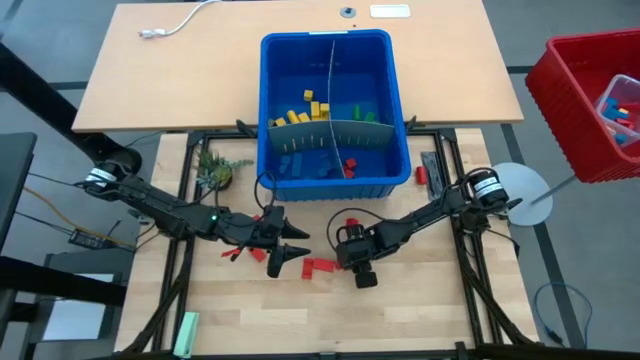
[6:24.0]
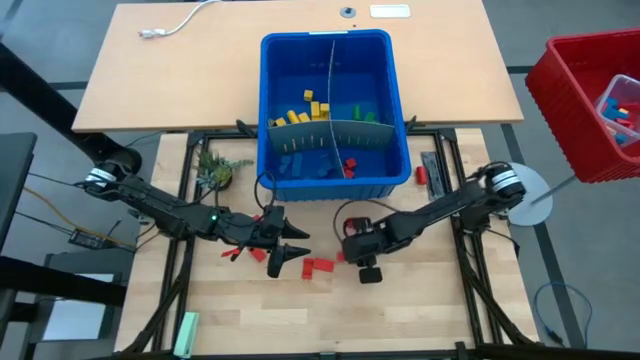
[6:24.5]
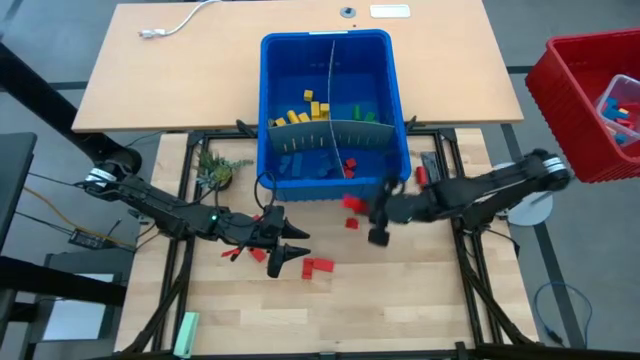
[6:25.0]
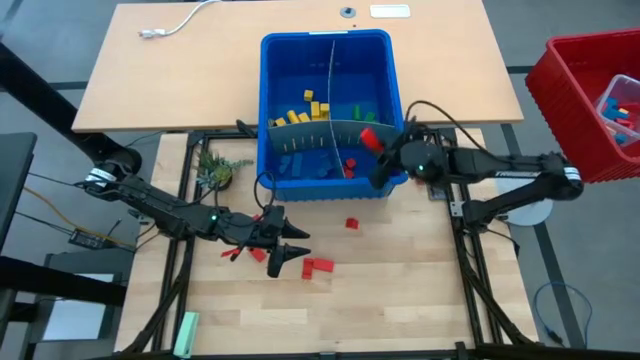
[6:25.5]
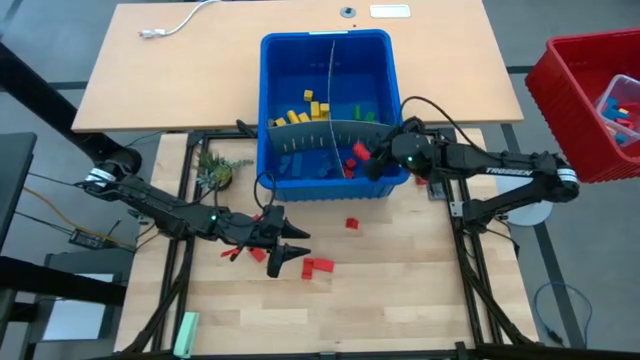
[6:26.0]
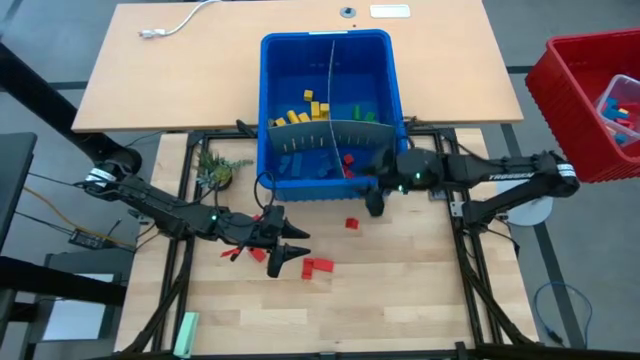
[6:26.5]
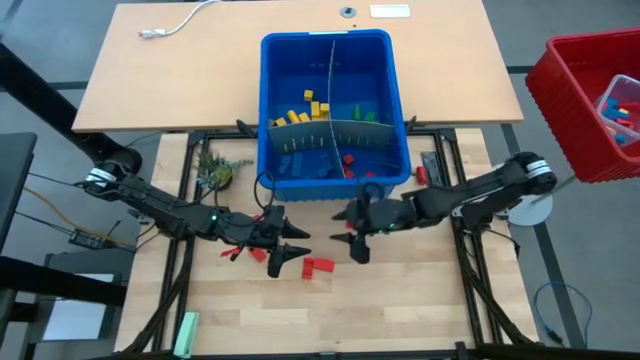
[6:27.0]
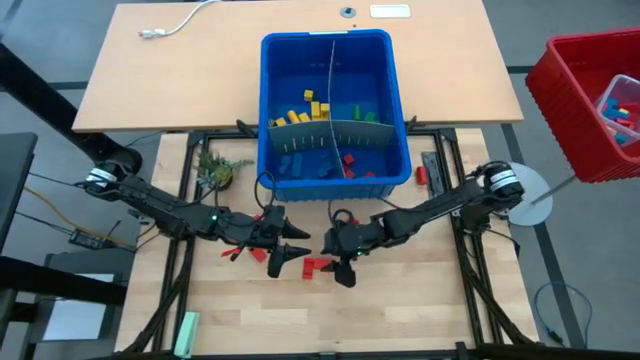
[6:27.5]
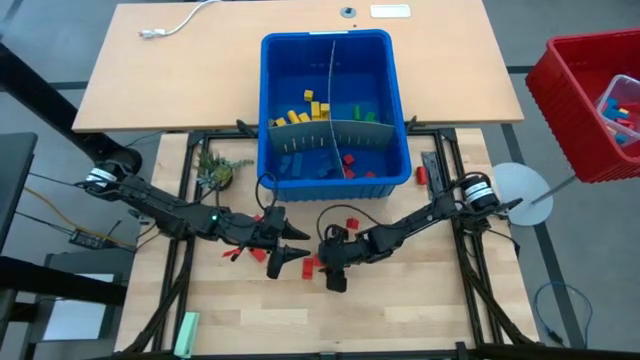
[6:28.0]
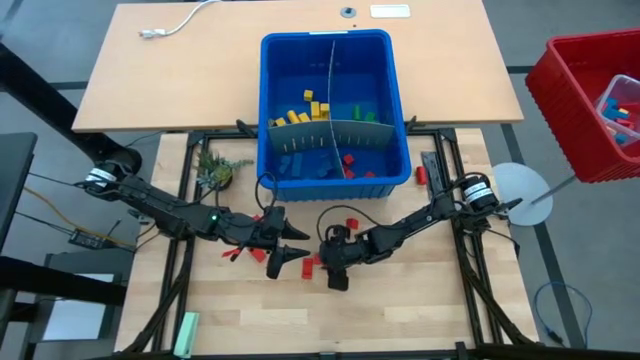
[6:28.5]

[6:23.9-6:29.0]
Task: Sort blocks
Put the orange block with the other orange blocks into the blue bin

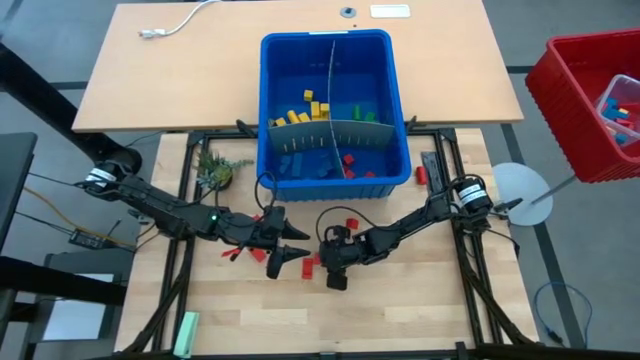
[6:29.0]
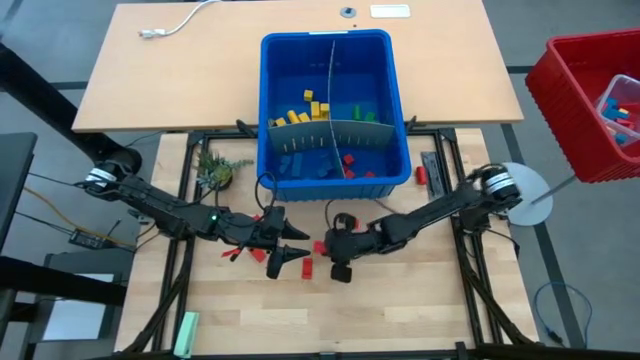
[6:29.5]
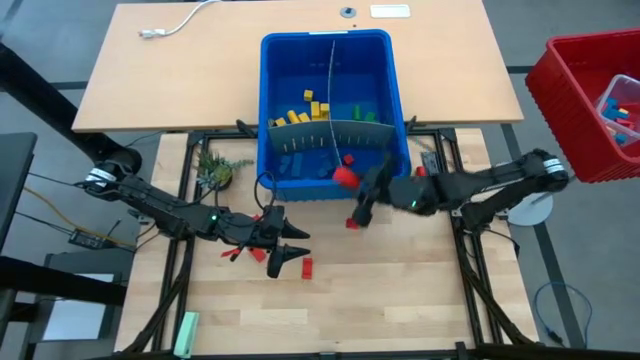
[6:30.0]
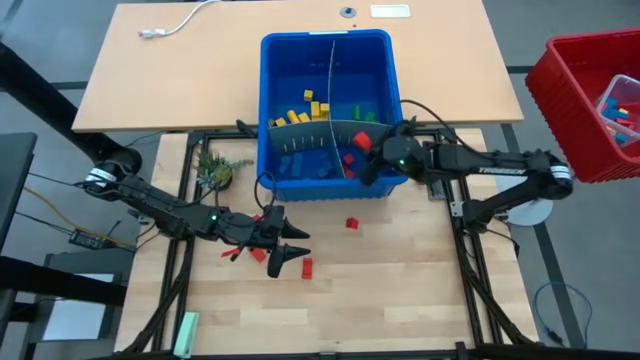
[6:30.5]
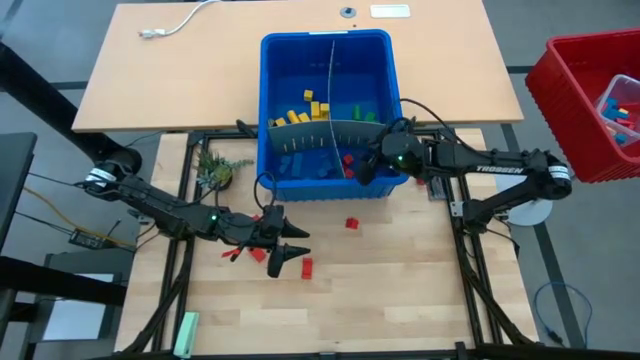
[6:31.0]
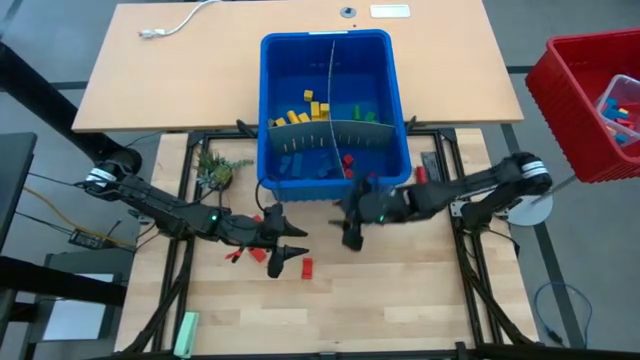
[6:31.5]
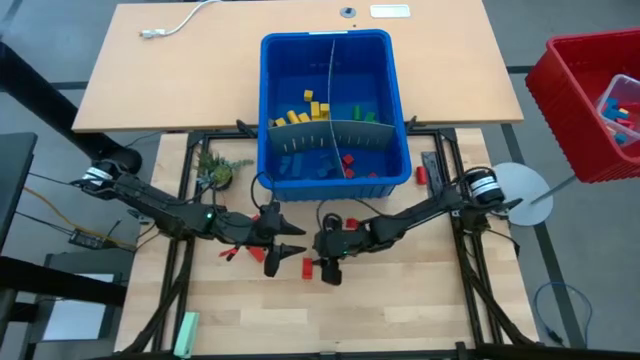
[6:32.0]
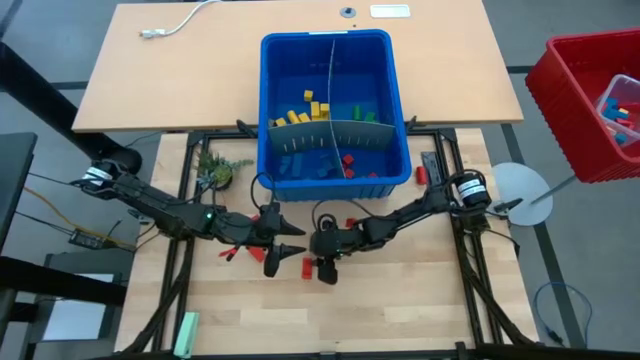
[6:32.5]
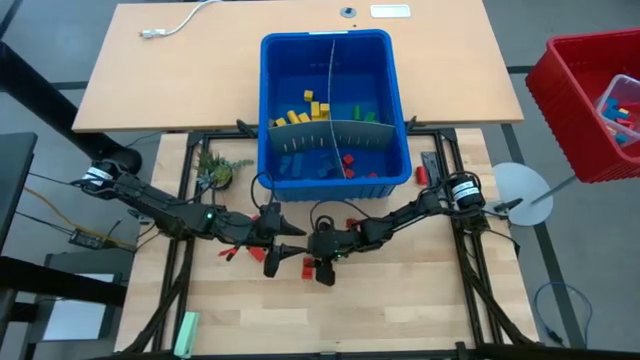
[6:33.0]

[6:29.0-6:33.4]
Put the orange block with the other orange blocks into the blue bin

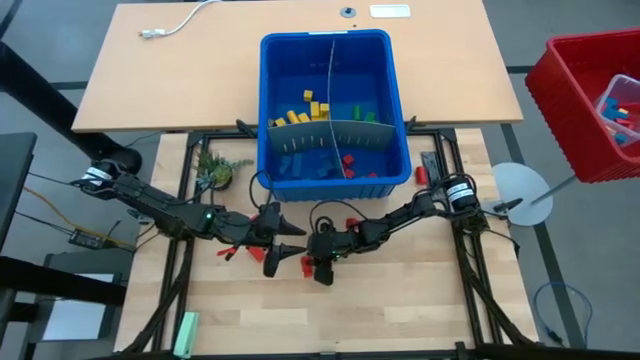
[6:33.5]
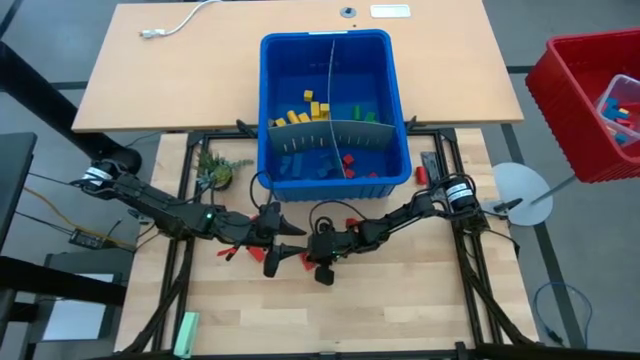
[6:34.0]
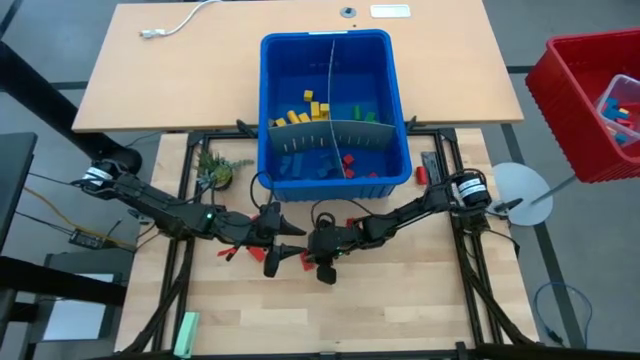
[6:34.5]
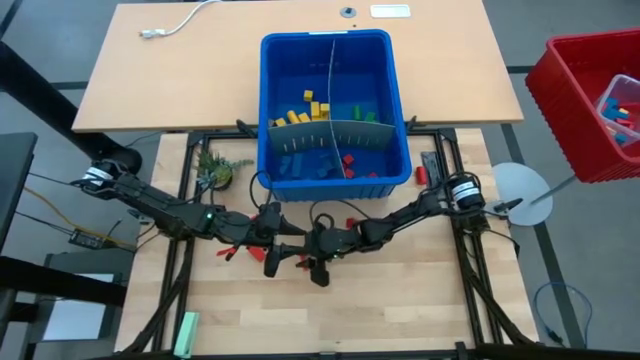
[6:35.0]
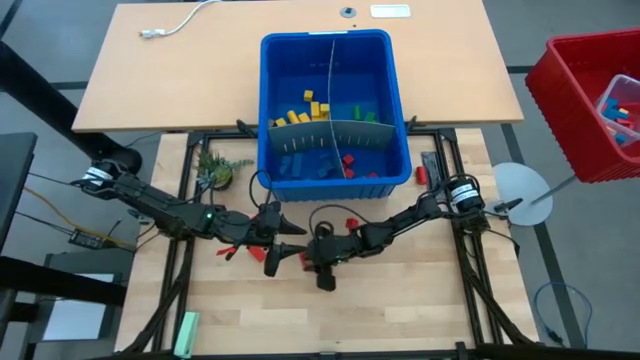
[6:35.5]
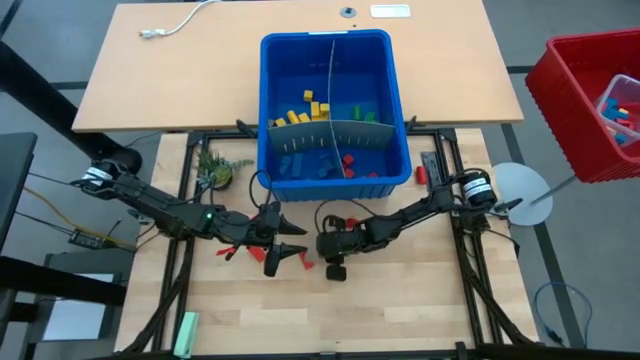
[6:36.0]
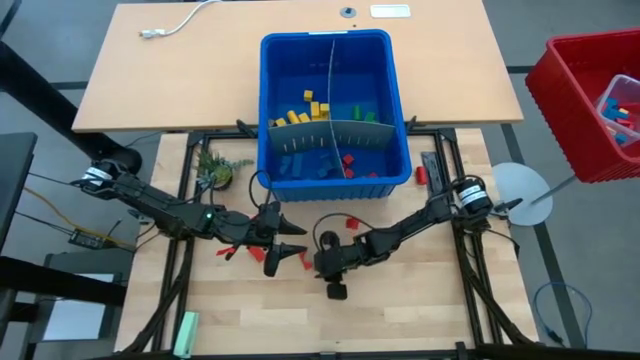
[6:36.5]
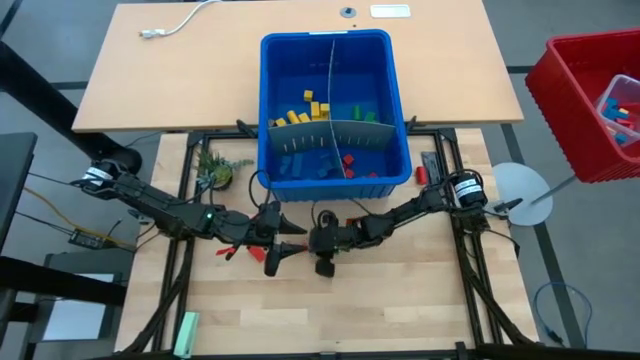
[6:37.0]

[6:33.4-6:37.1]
Put the orange block with the other orange blocks into the blue bin

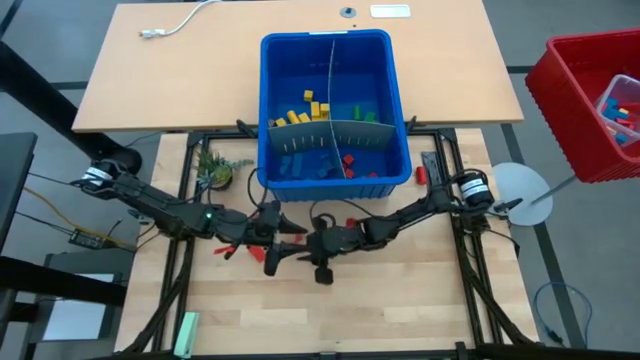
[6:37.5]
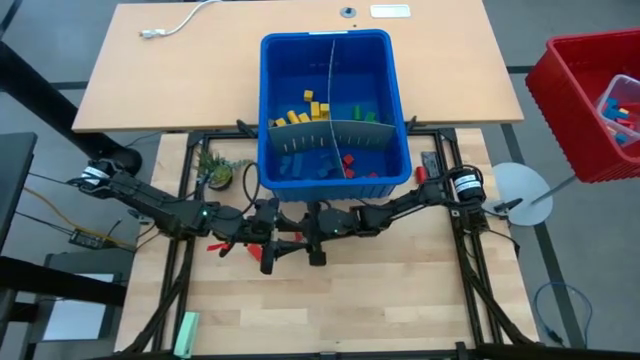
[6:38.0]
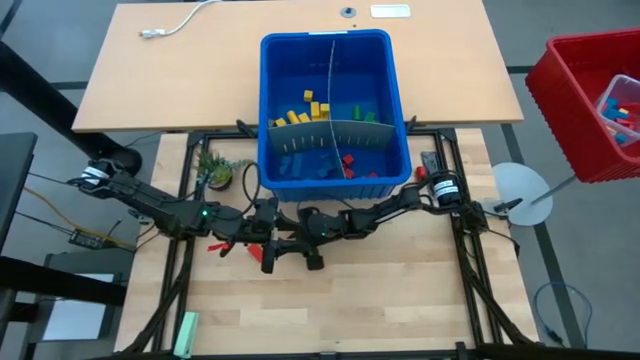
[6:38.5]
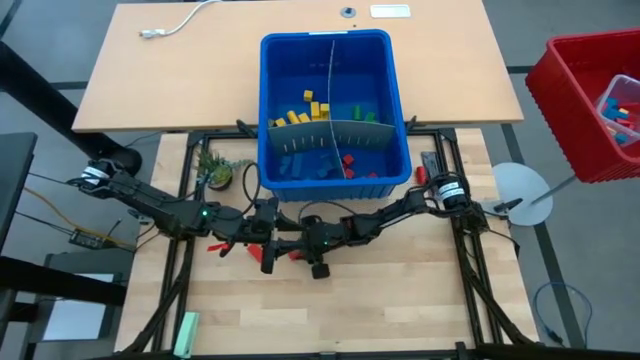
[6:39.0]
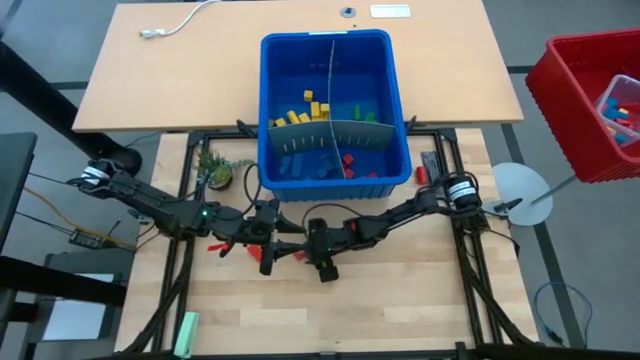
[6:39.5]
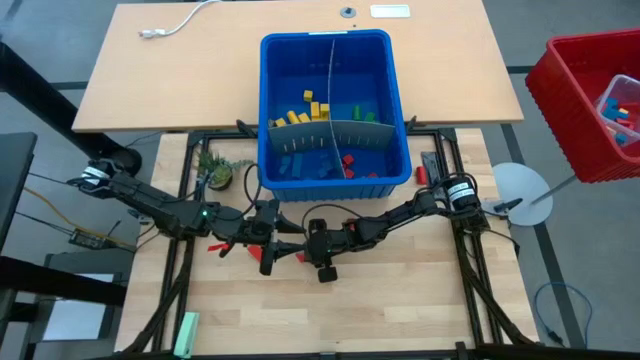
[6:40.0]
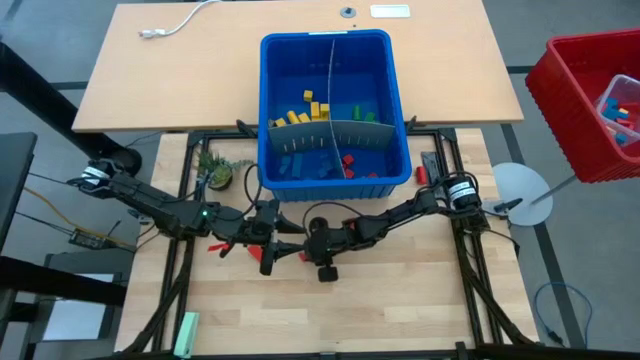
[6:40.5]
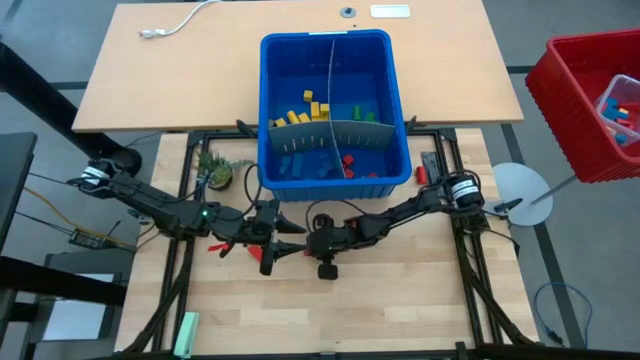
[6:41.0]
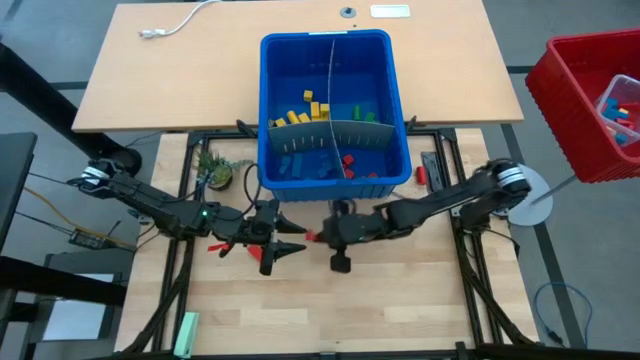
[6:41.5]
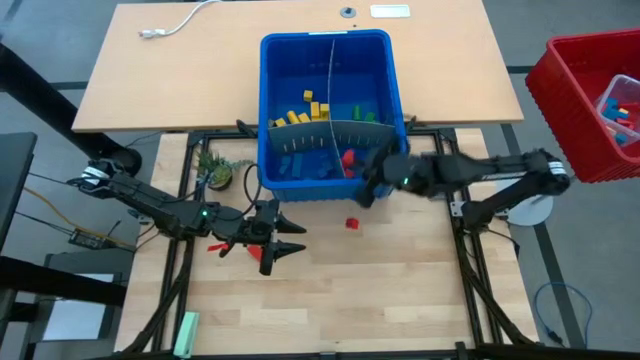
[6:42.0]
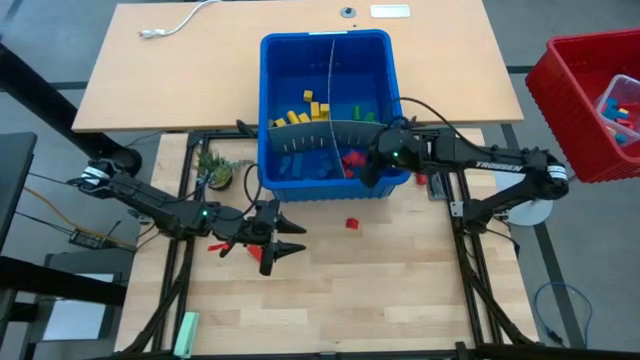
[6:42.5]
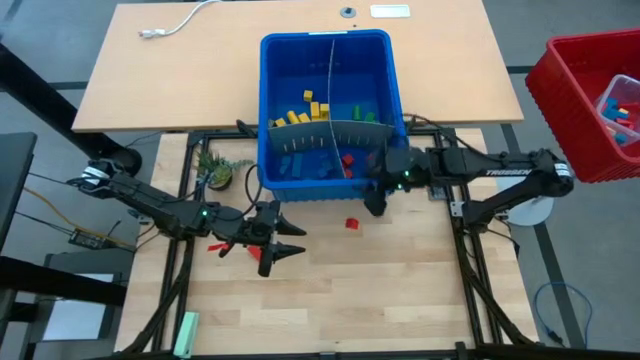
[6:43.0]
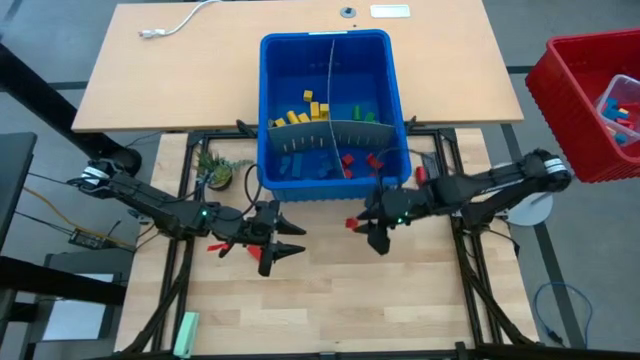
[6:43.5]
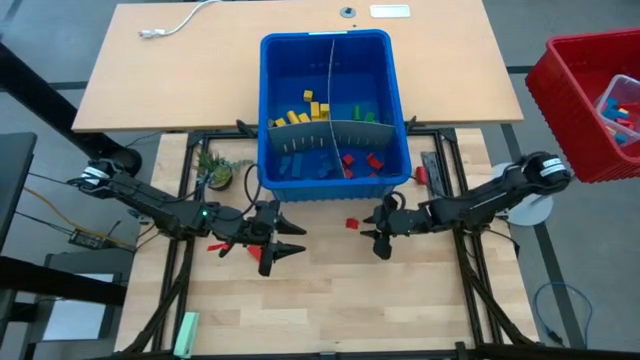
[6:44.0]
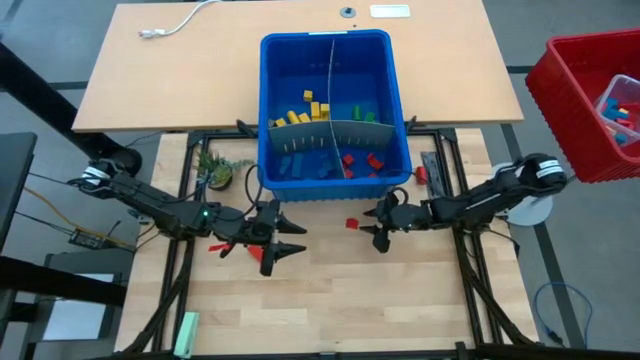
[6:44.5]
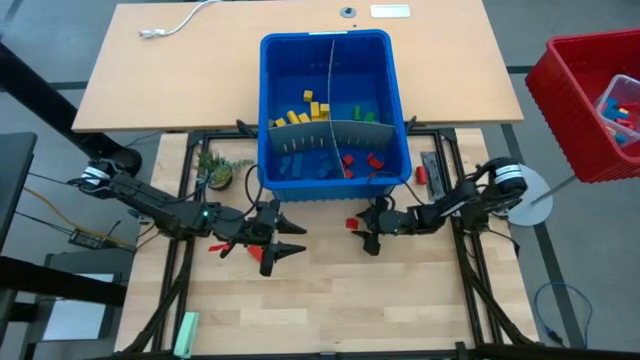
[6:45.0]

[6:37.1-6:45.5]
Put the orange block with the other orange blocks into the blue bin
